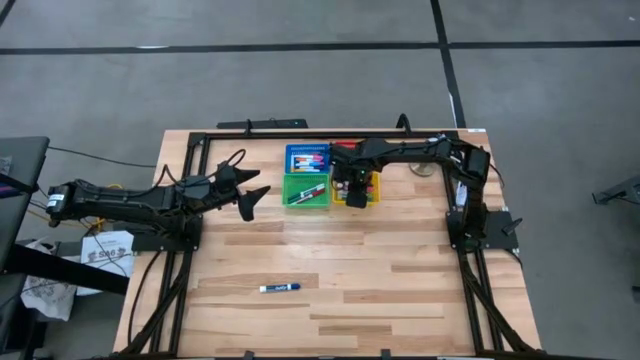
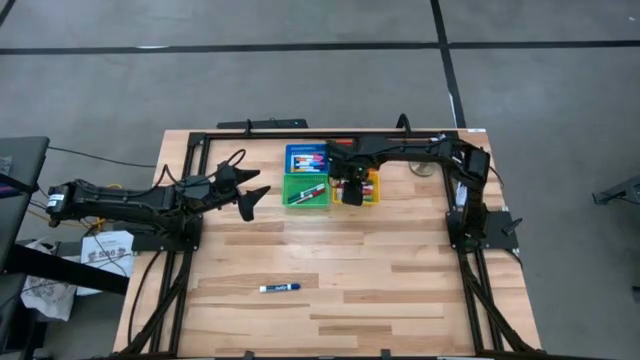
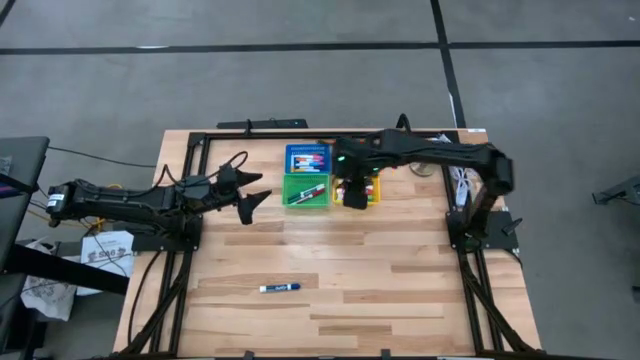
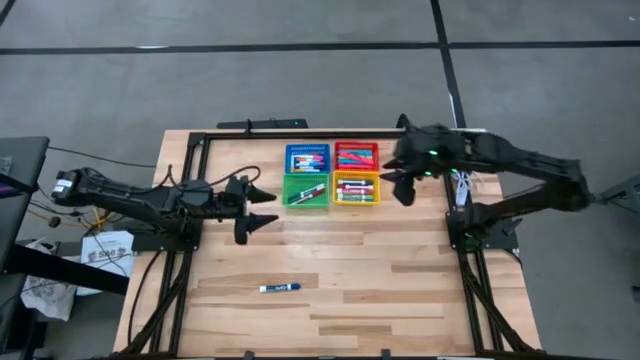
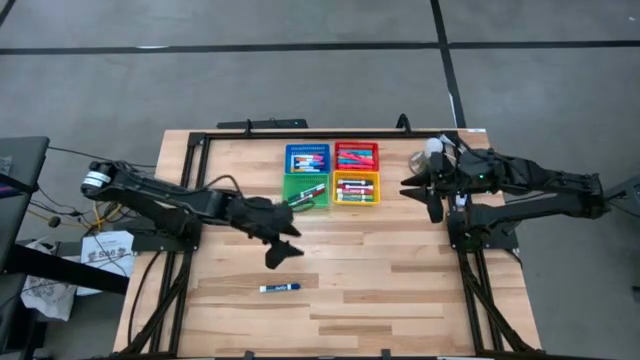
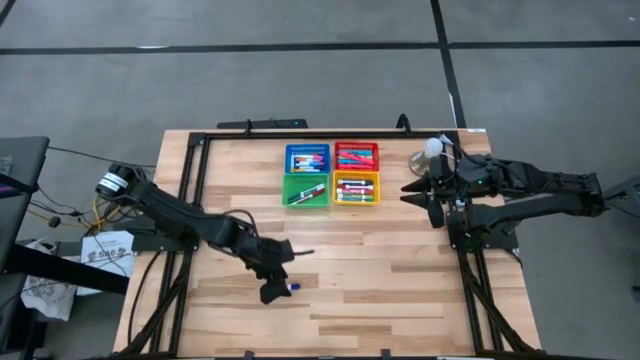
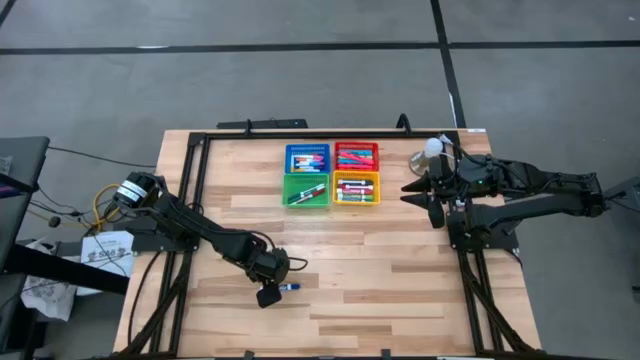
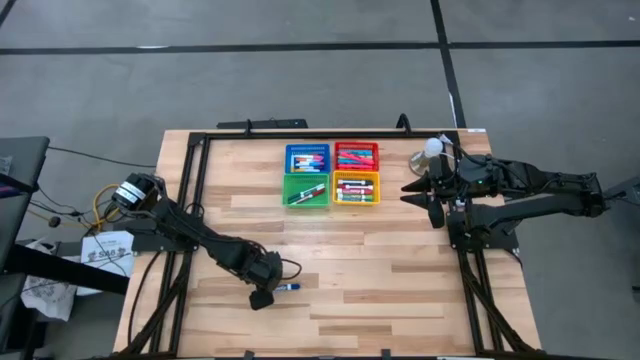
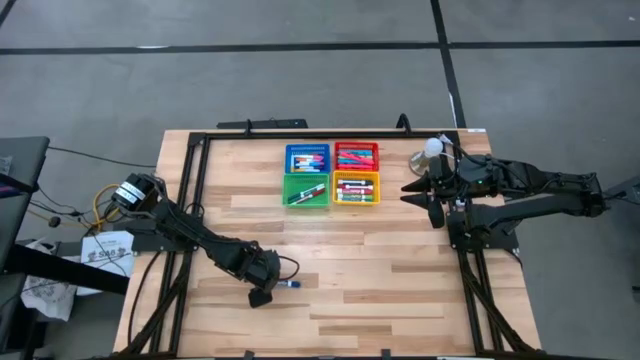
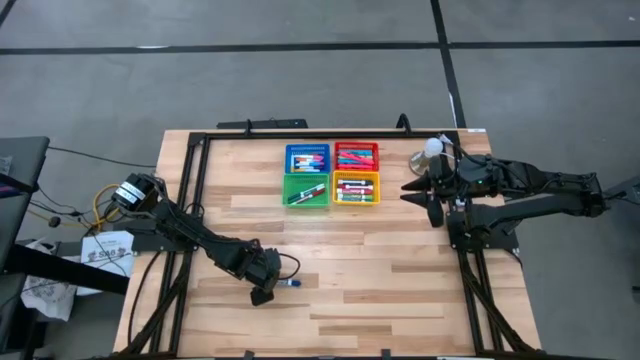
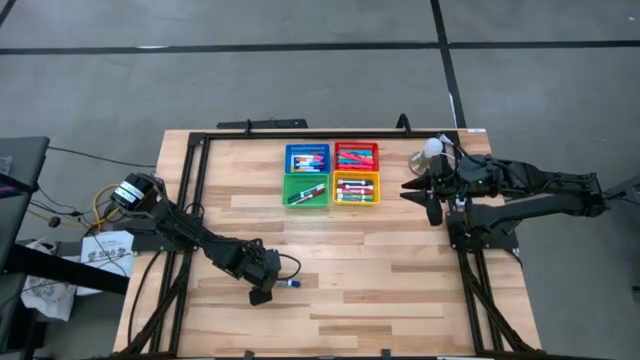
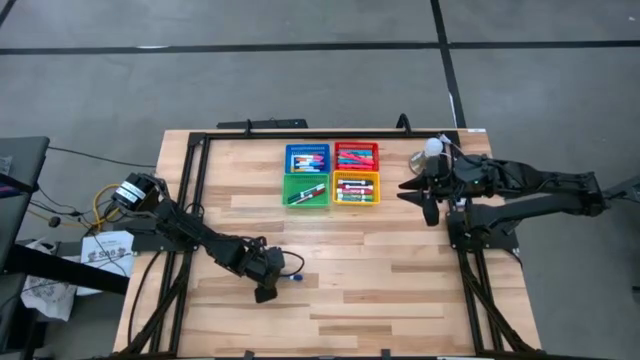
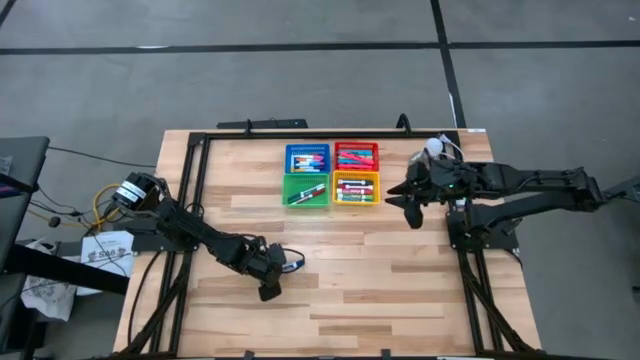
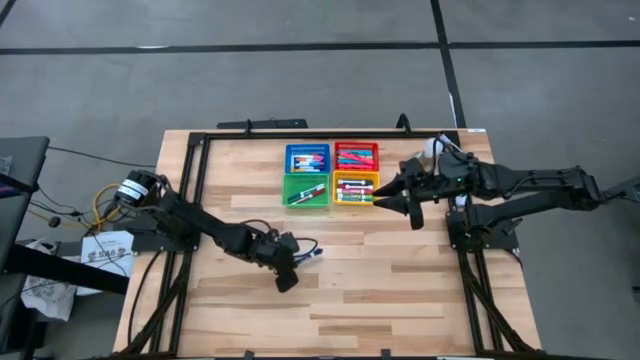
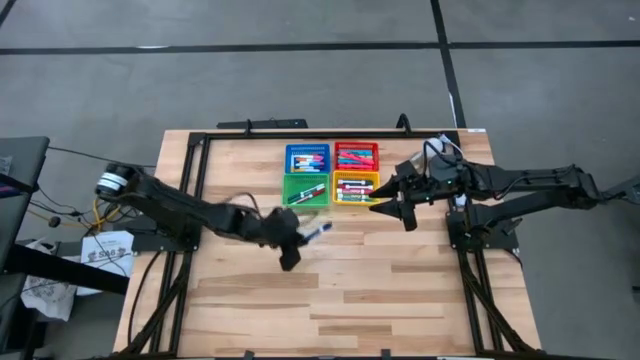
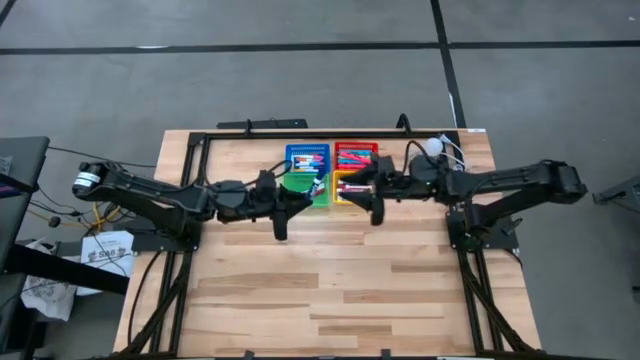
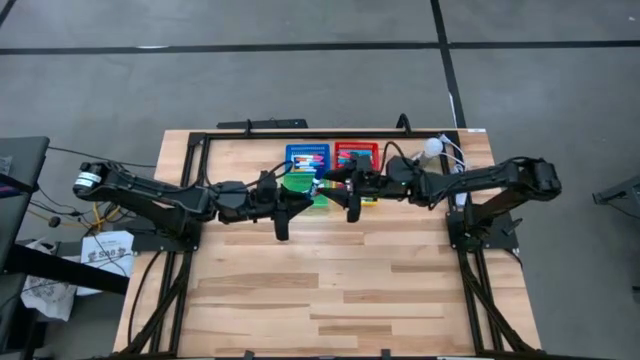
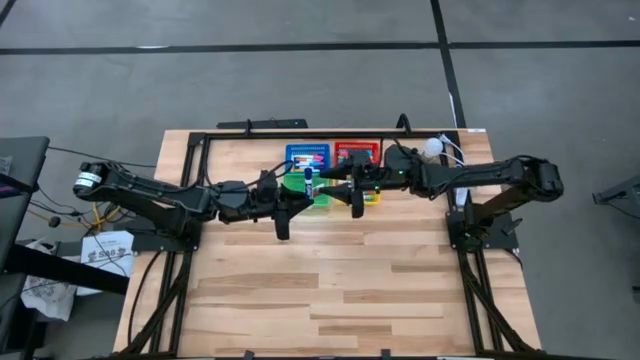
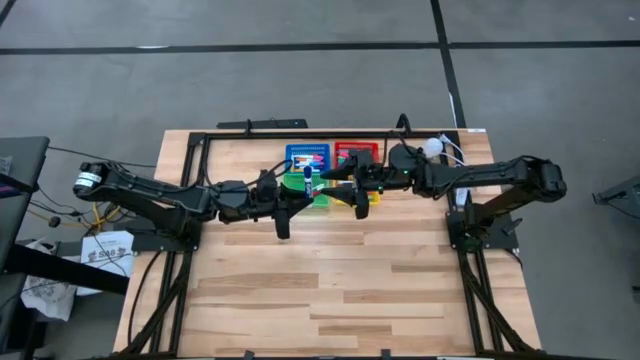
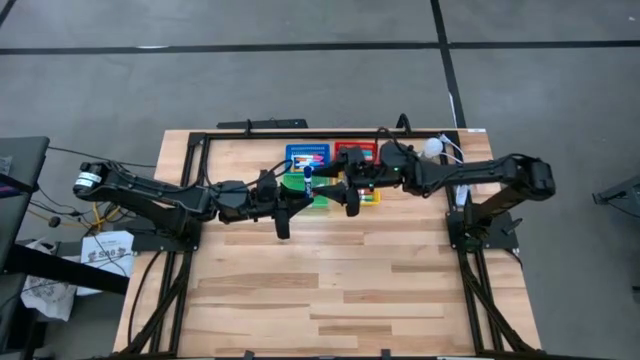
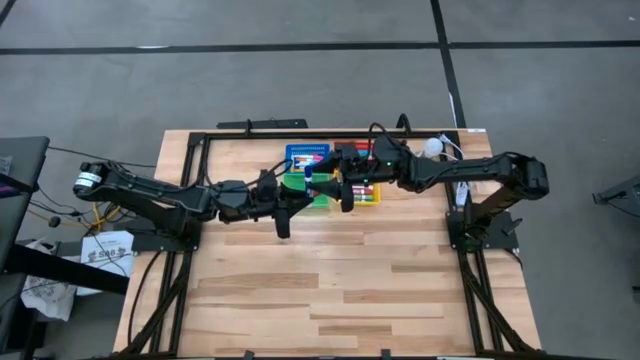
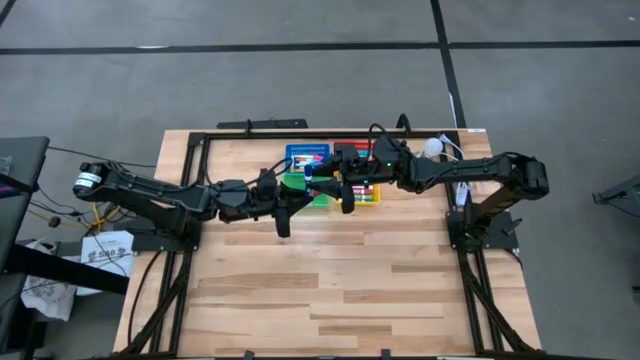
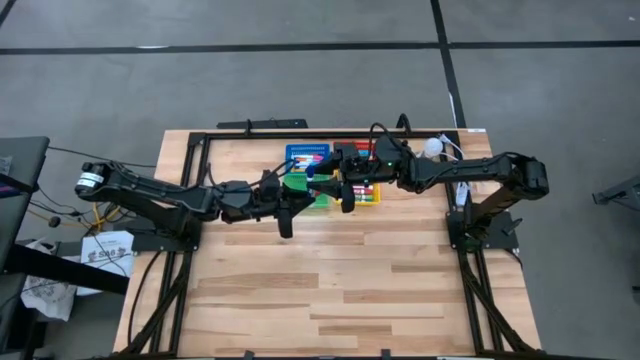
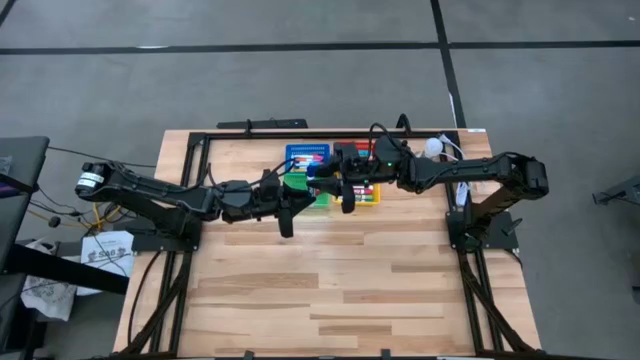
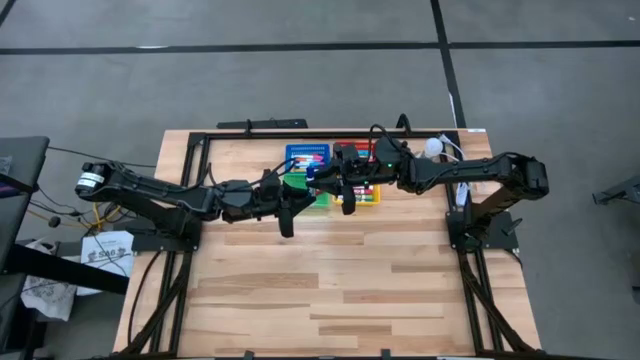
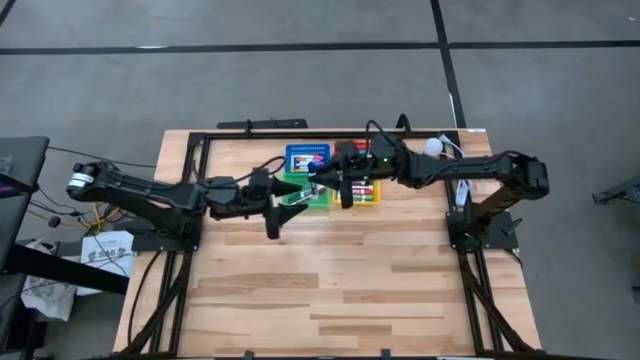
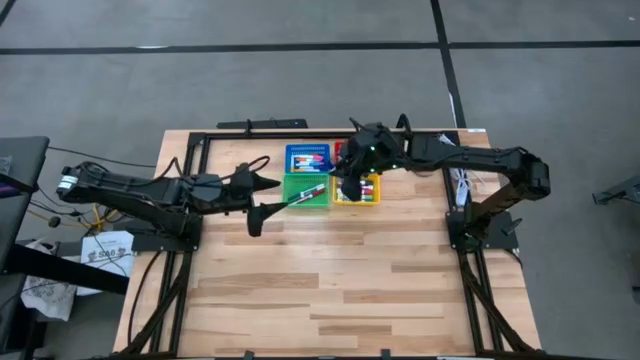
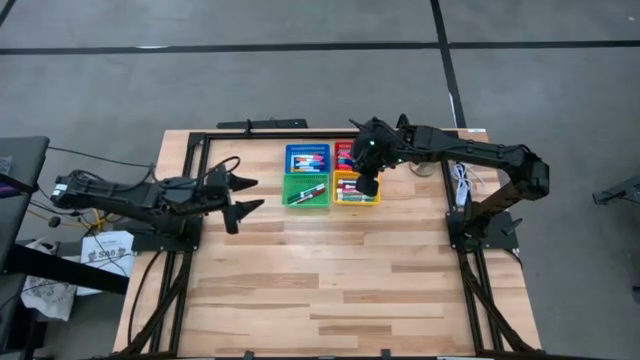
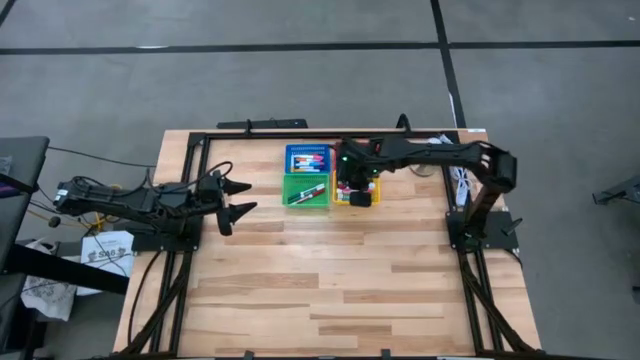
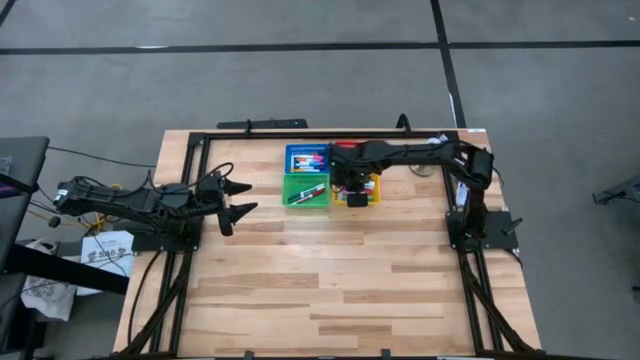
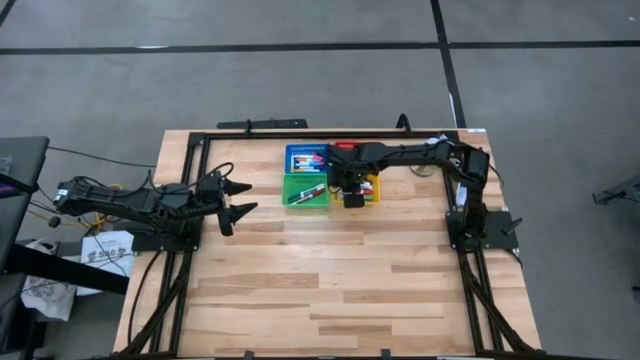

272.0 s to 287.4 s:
Task: Pick & Place Markers
Put the large blue marker into the yellow bin

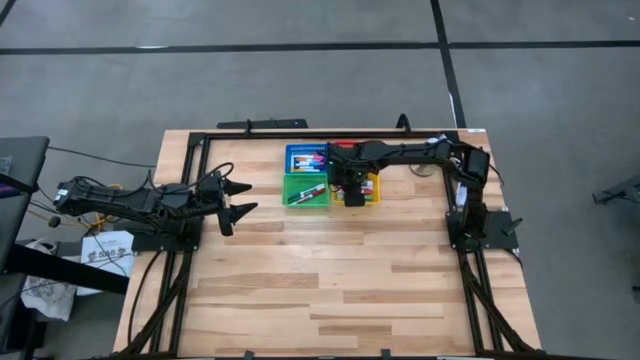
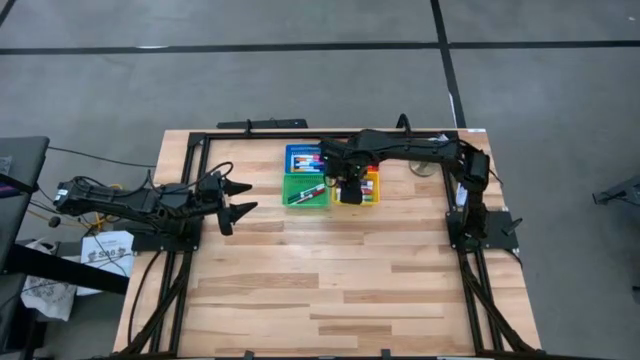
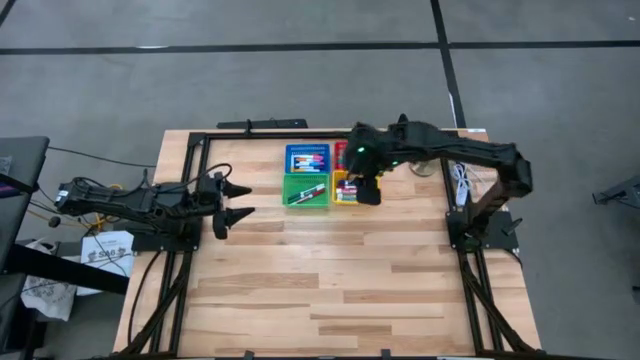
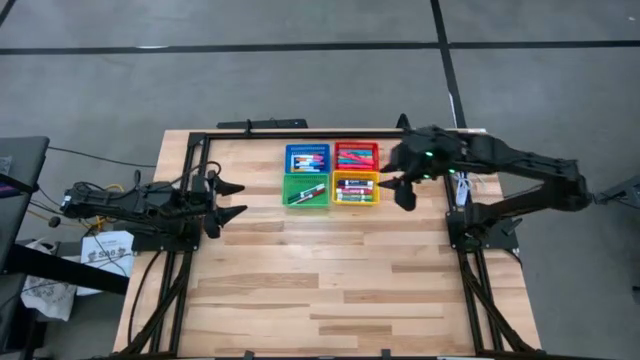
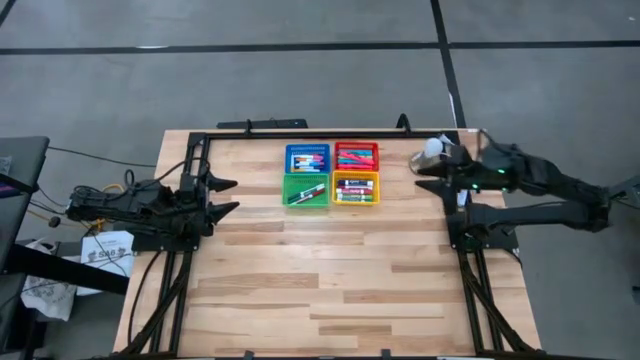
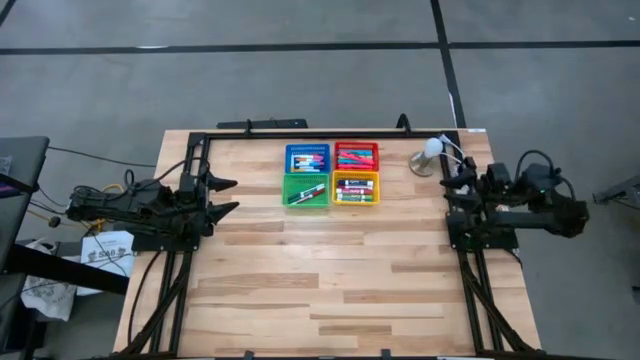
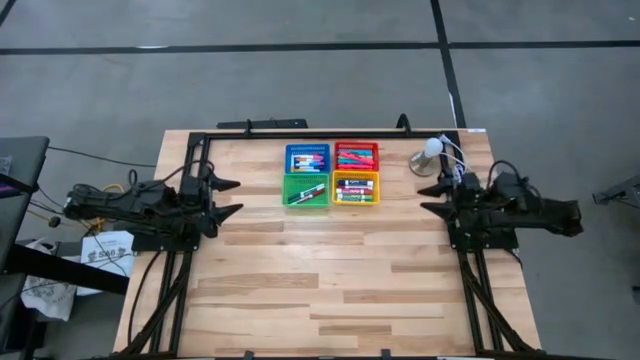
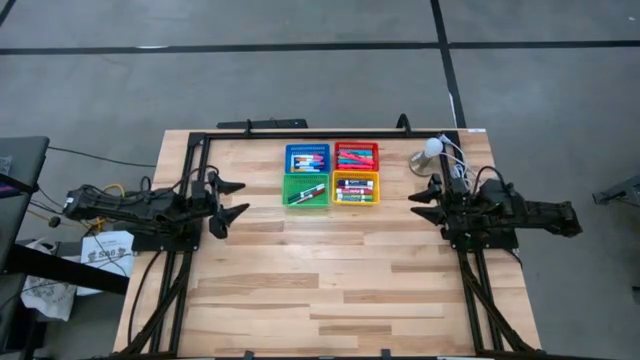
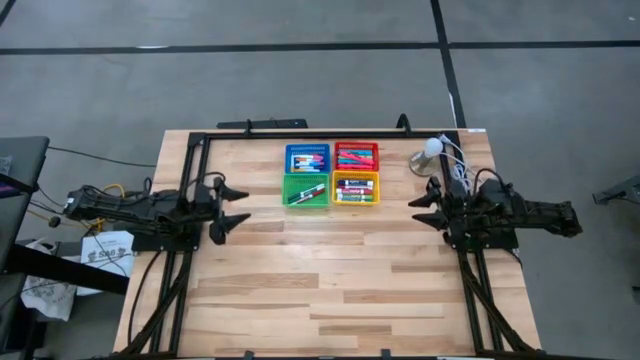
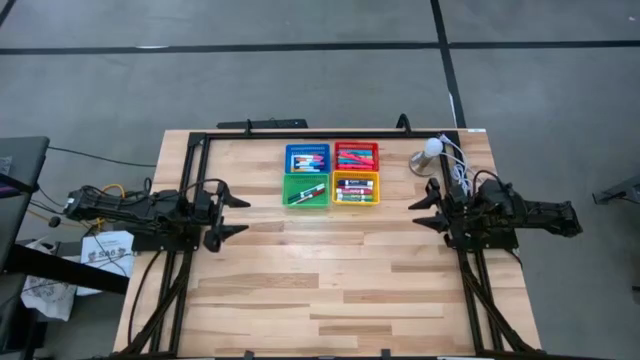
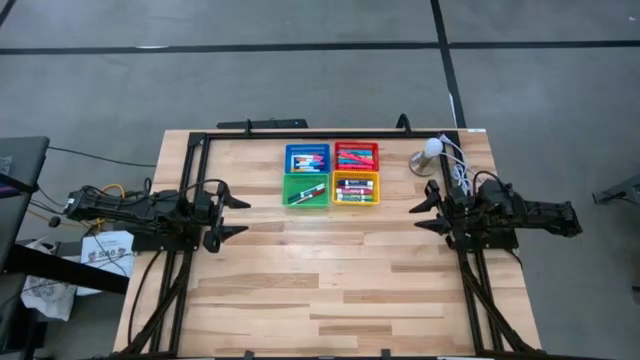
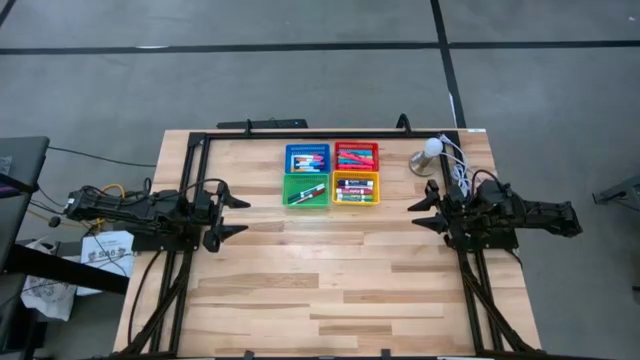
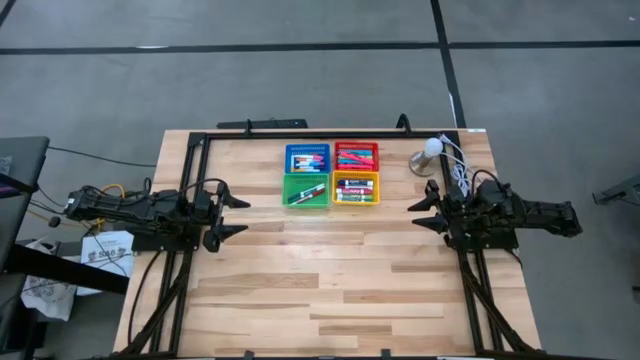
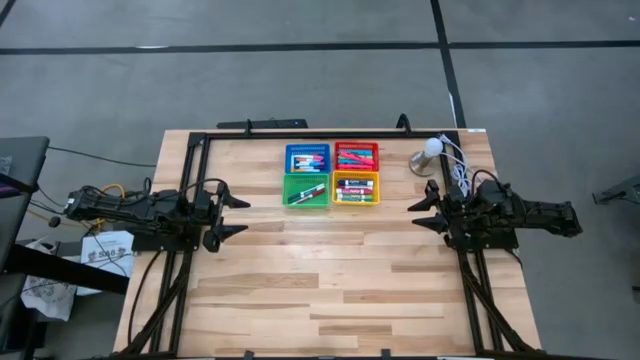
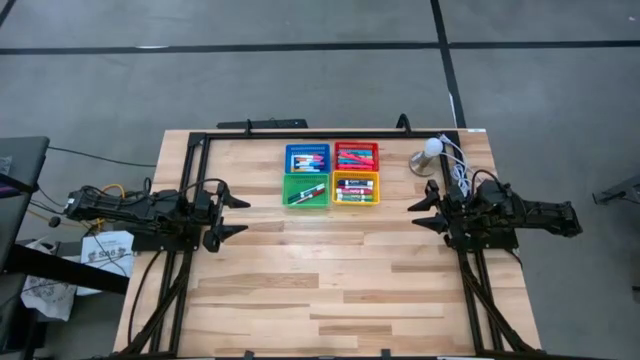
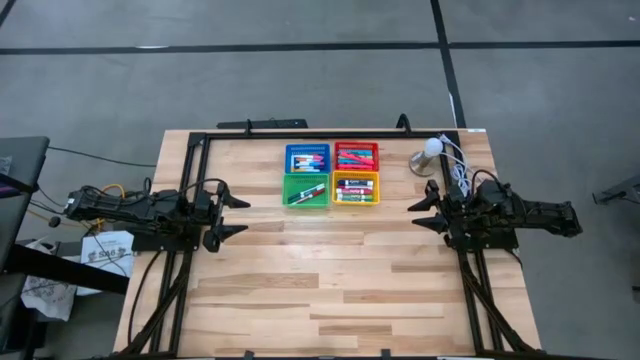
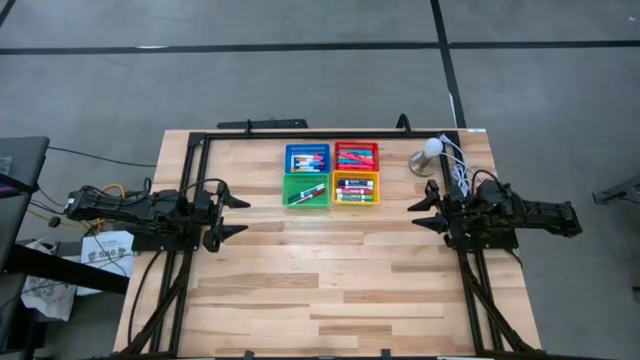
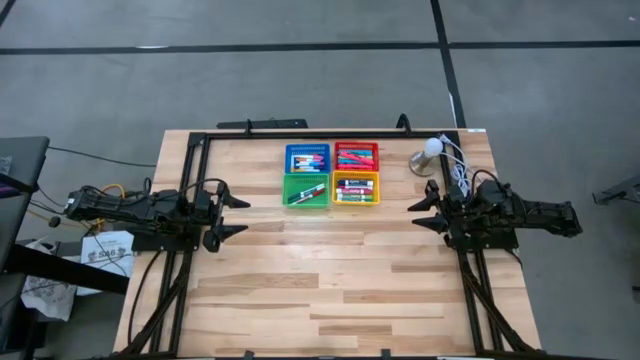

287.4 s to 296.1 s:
Return to Home Position
